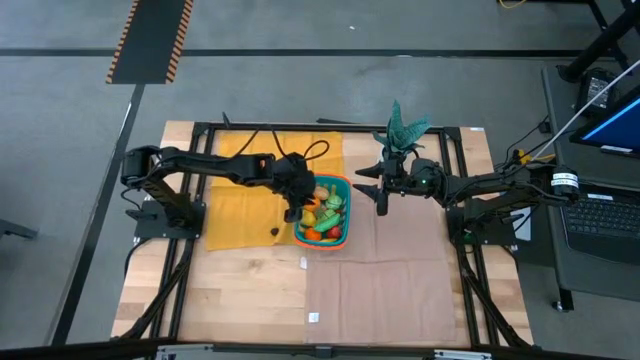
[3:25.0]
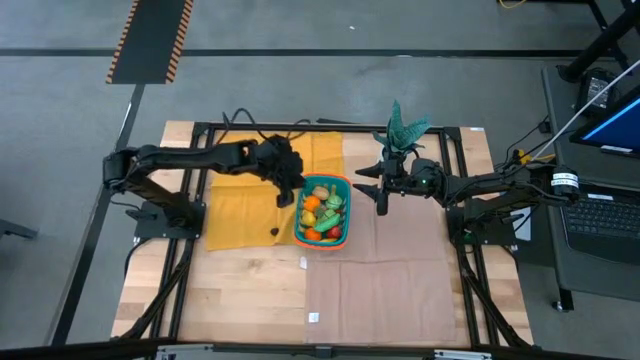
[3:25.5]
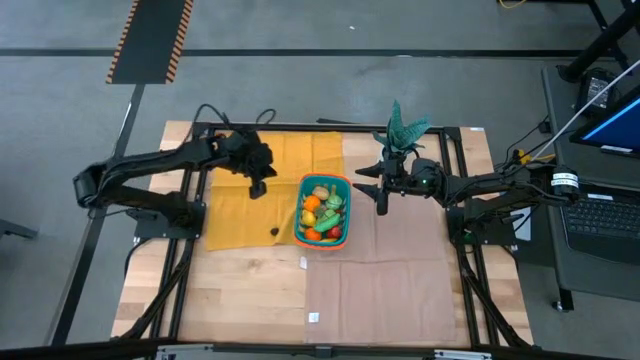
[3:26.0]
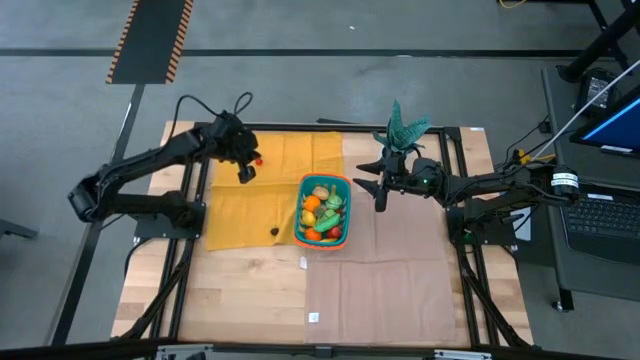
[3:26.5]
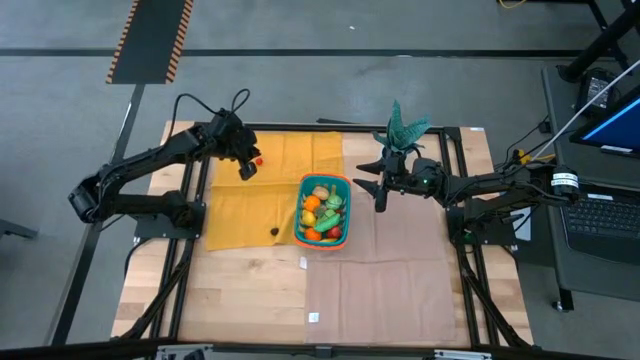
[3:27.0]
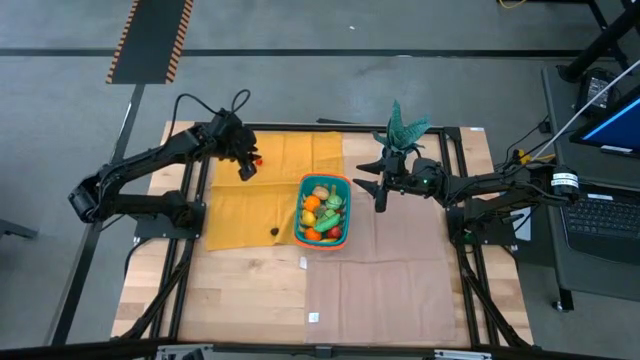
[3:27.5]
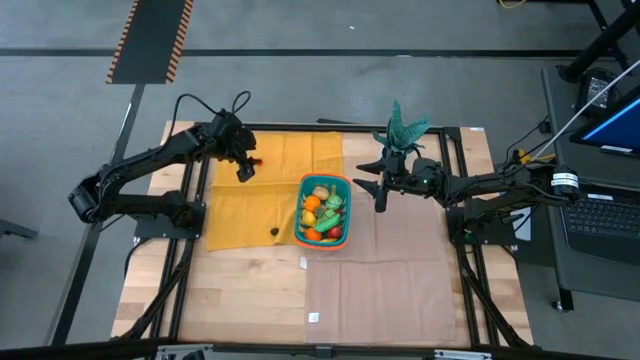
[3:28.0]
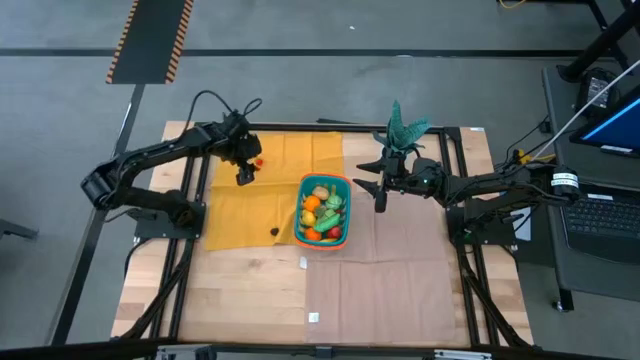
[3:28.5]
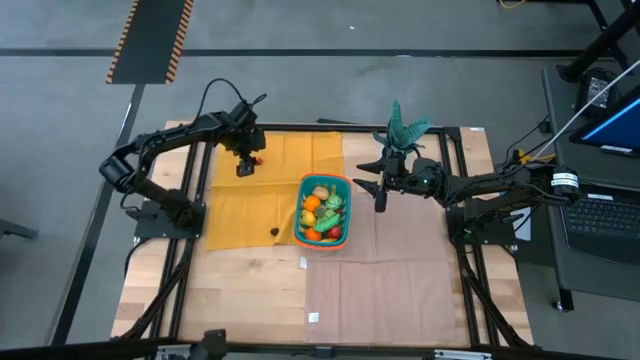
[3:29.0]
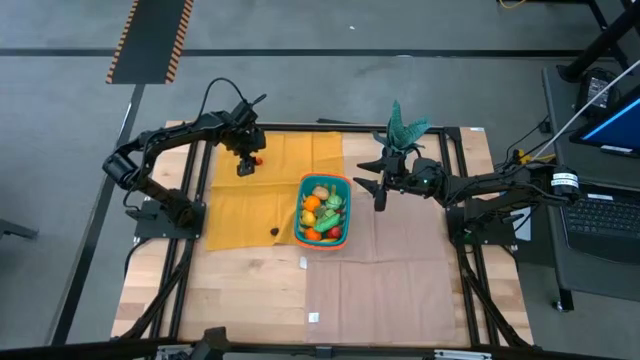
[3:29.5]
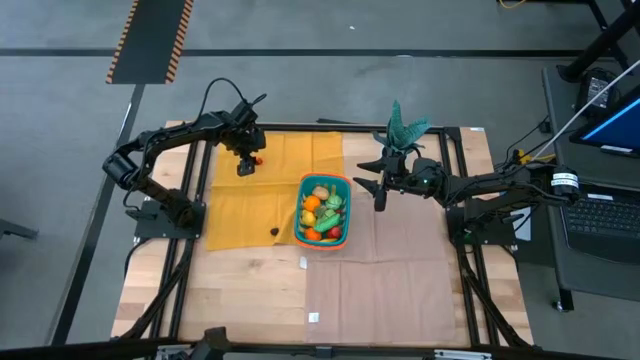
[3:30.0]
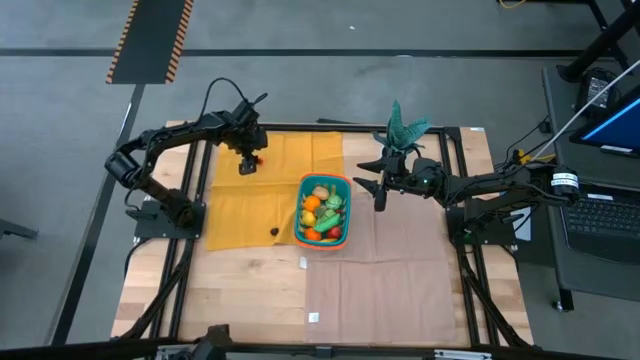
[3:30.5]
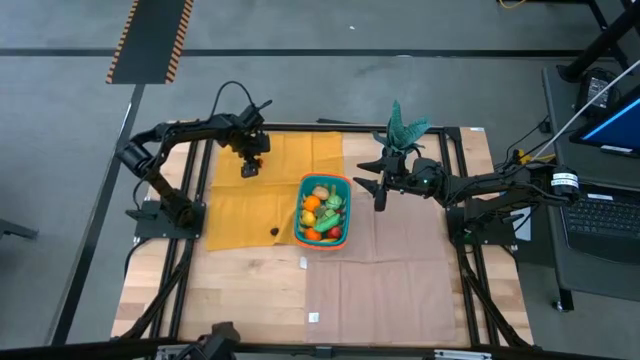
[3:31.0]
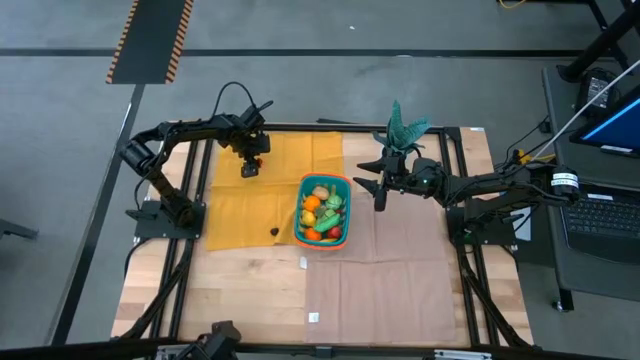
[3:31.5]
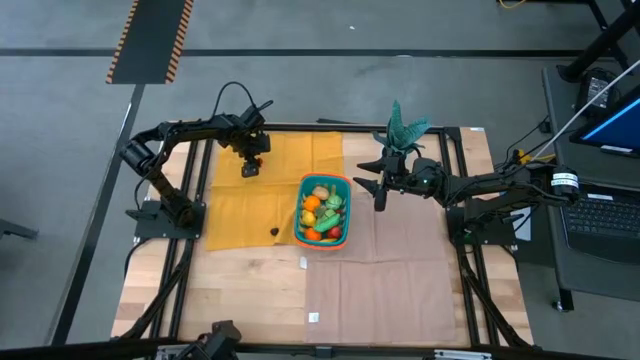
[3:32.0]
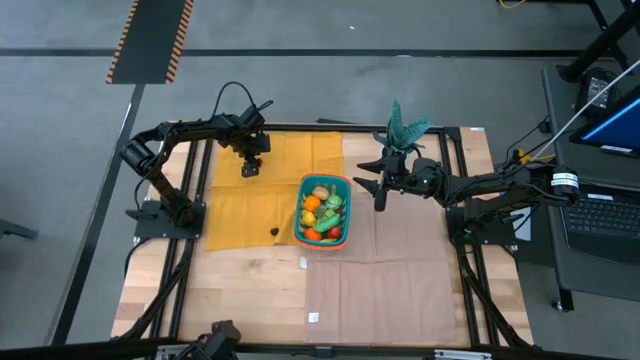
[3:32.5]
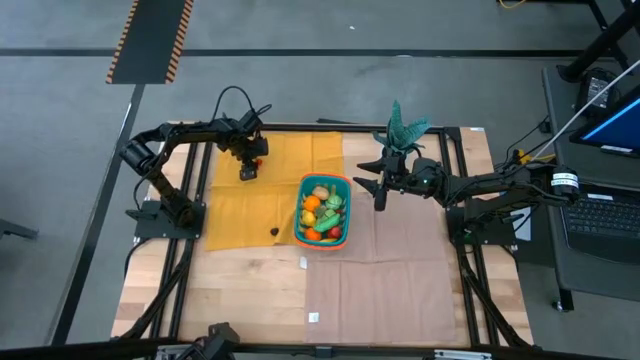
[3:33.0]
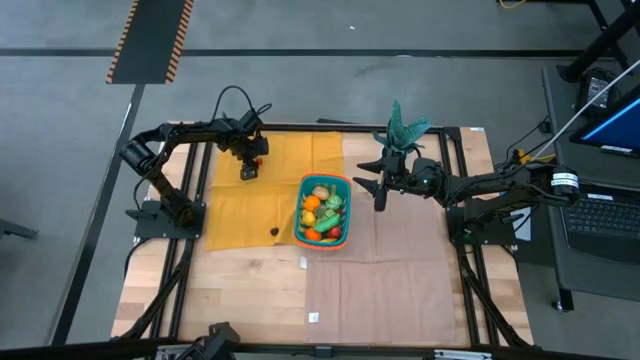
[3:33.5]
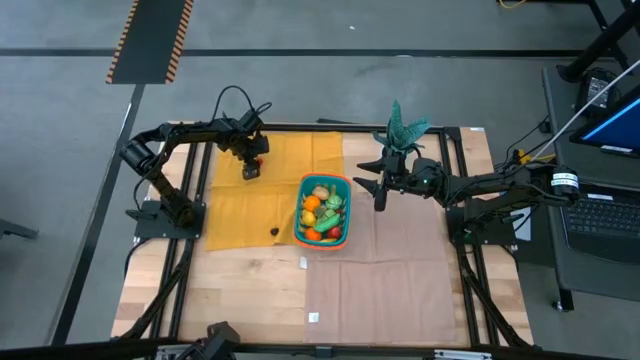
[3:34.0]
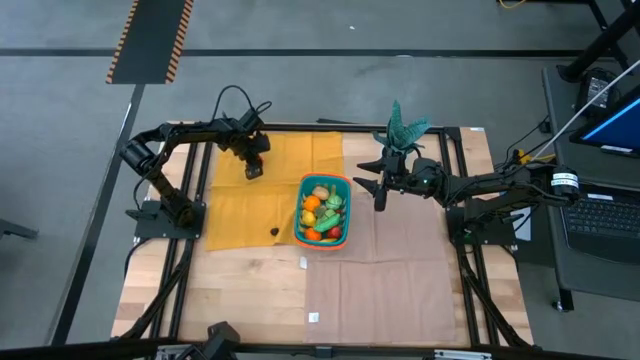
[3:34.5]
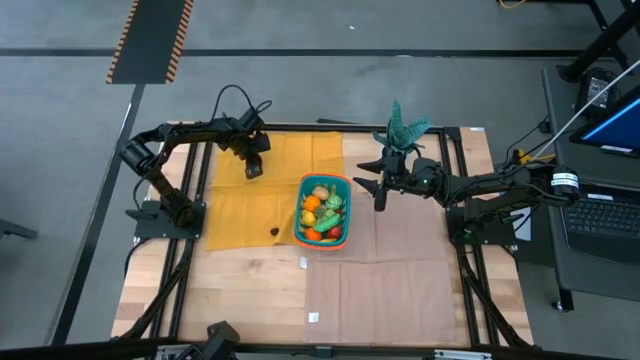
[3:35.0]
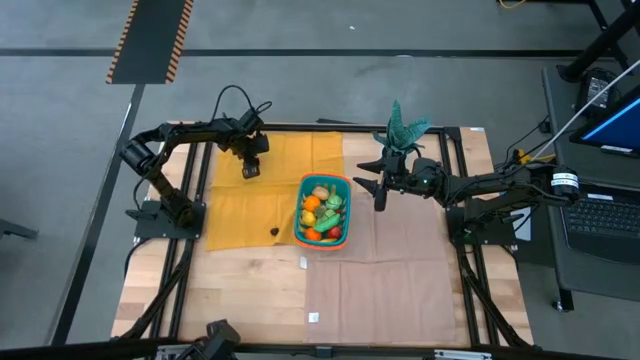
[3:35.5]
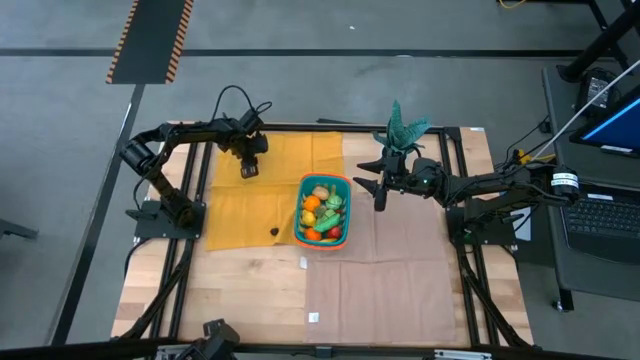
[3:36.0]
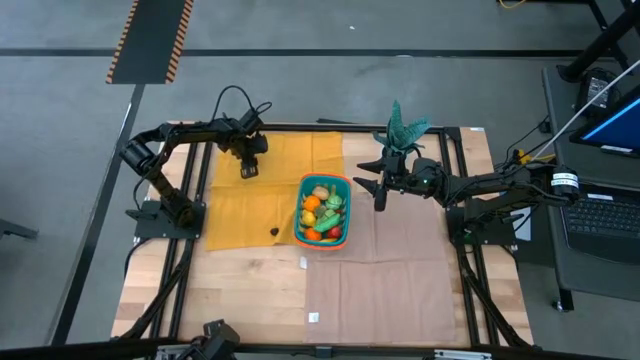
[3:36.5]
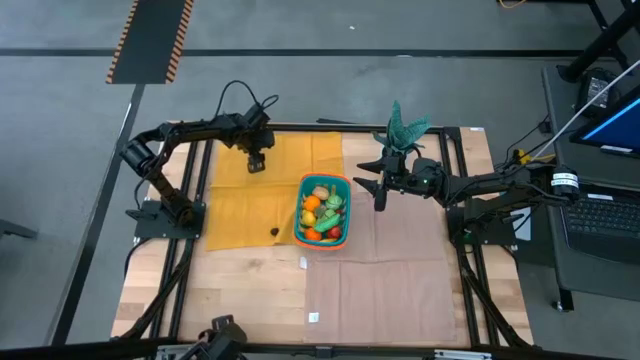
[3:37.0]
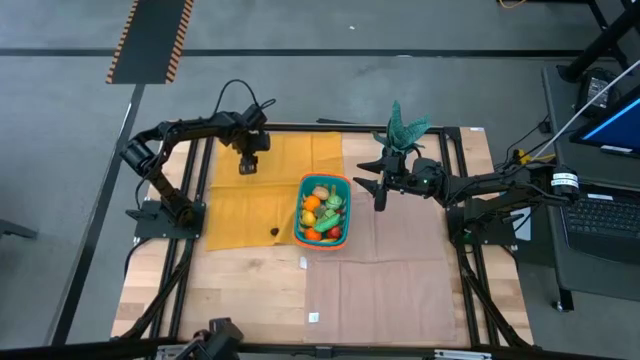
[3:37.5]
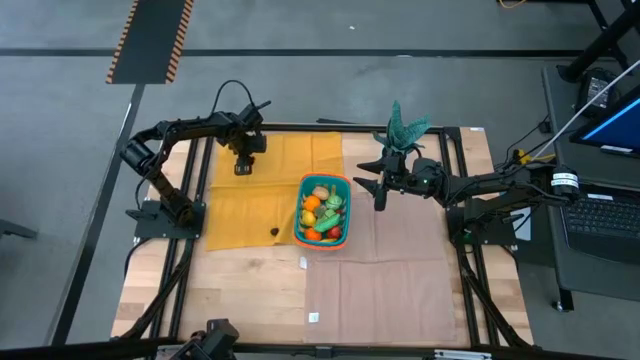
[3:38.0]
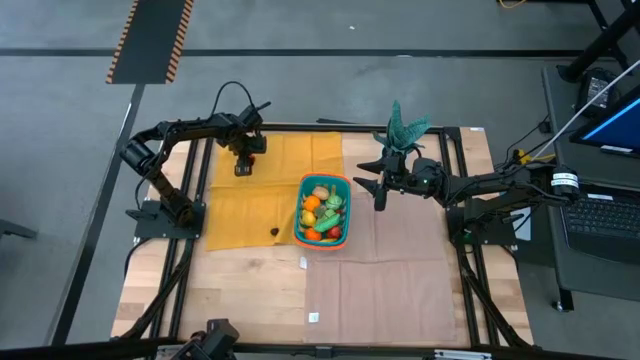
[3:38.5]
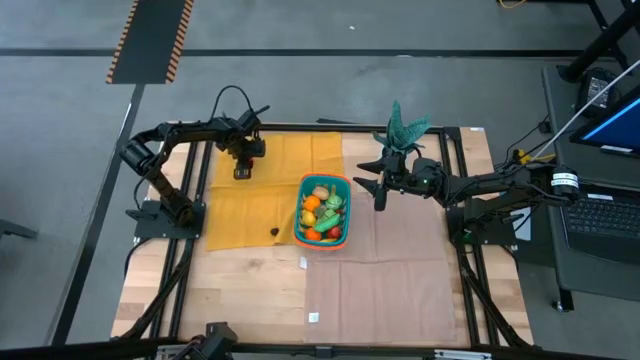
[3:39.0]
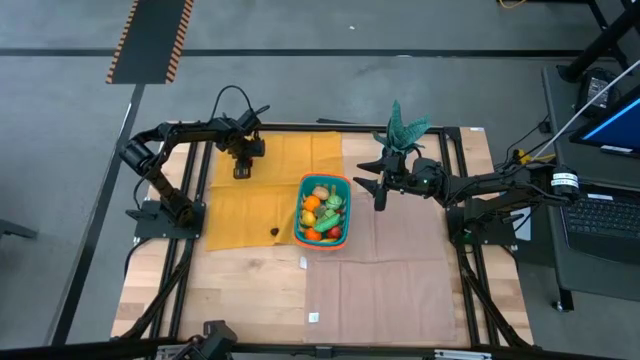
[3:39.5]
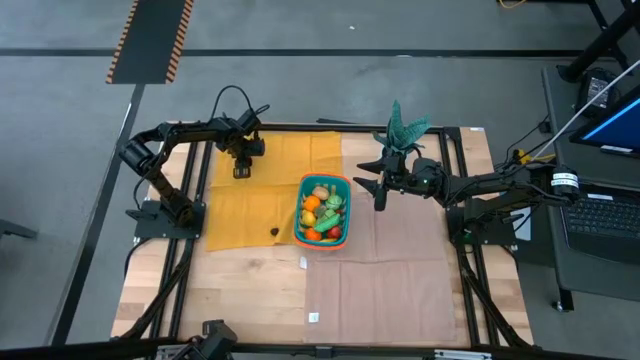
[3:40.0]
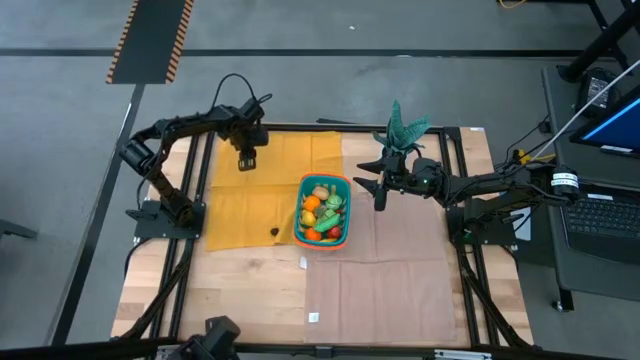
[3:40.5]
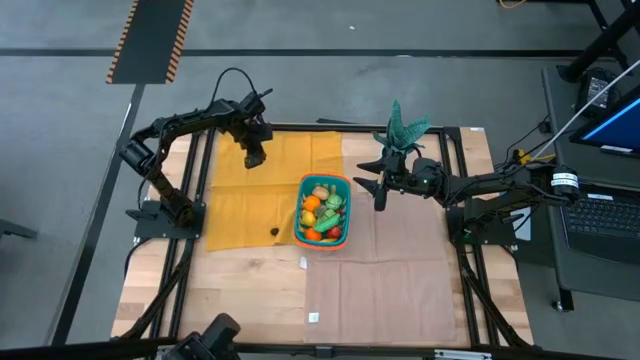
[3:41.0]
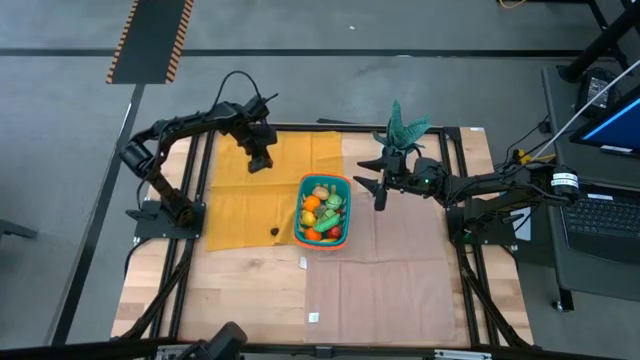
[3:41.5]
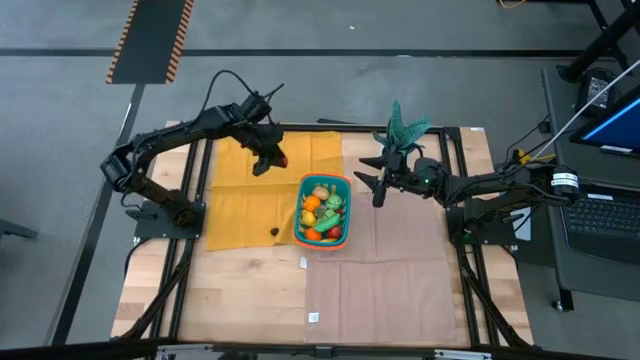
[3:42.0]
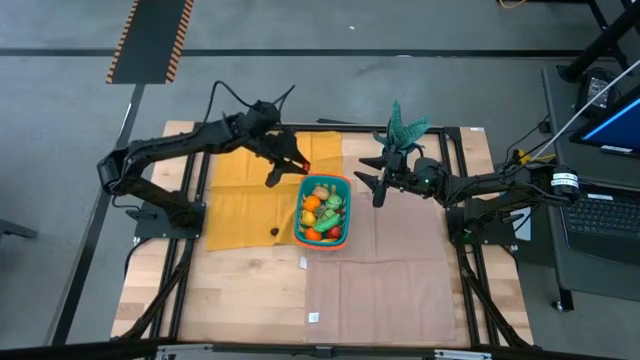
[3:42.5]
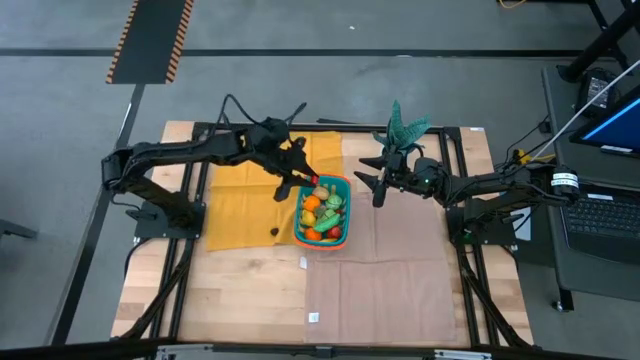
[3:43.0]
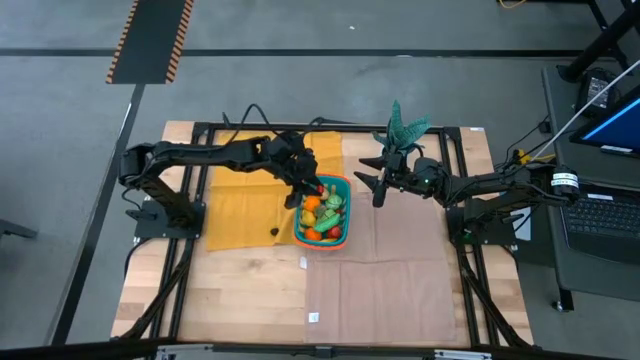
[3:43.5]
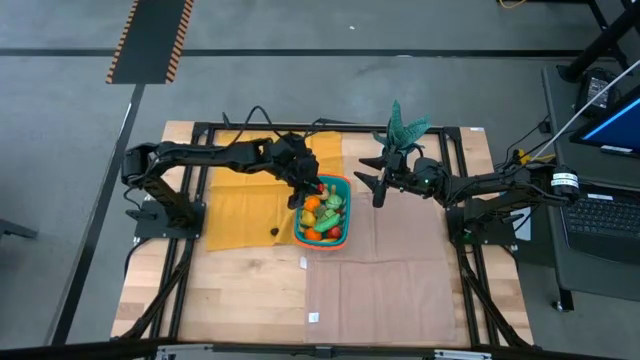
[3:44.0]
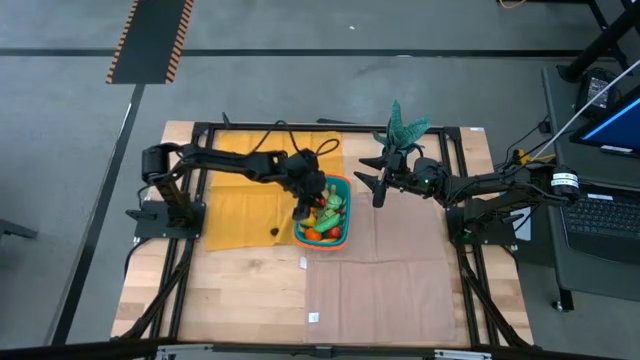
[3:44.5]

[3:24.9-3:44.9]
Task: Pick and placing Produce into tupperware
Put the cherry into the basket

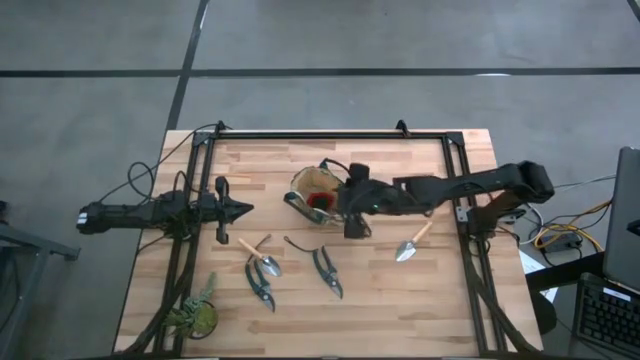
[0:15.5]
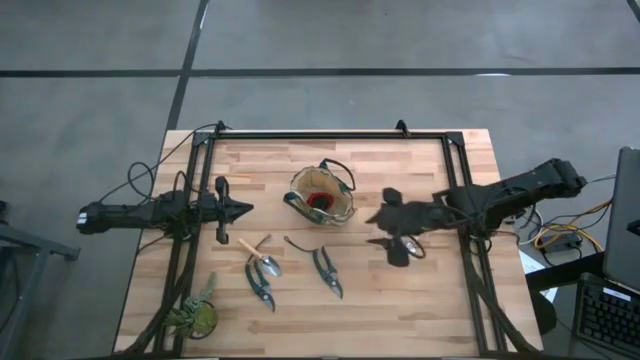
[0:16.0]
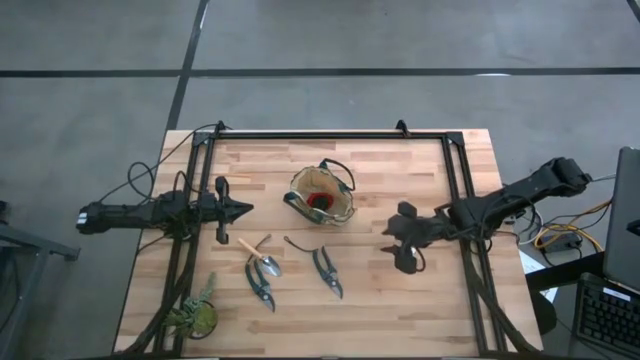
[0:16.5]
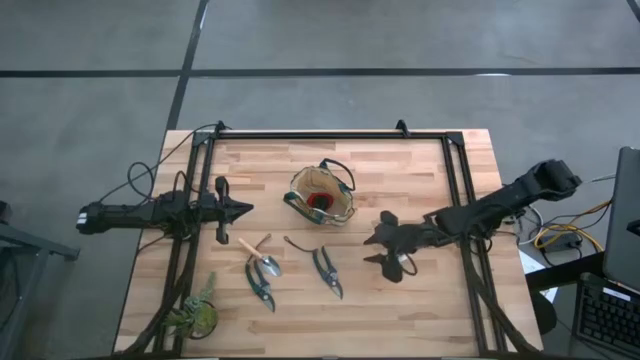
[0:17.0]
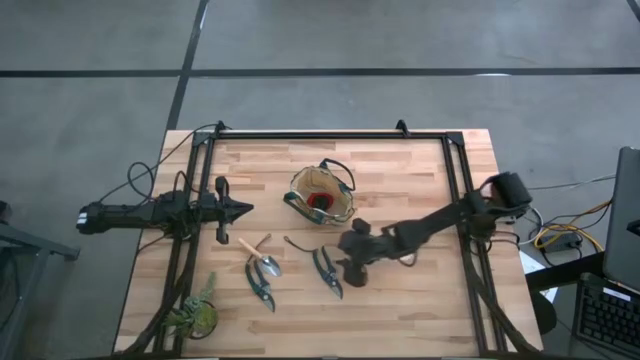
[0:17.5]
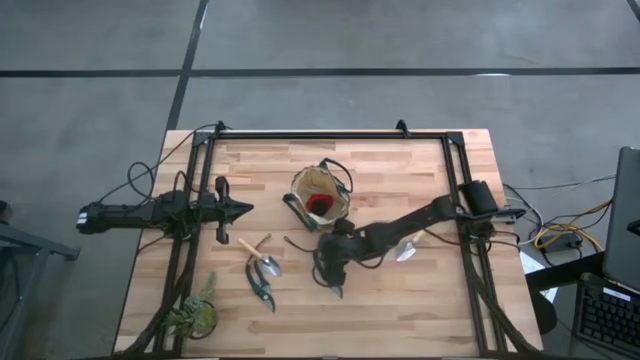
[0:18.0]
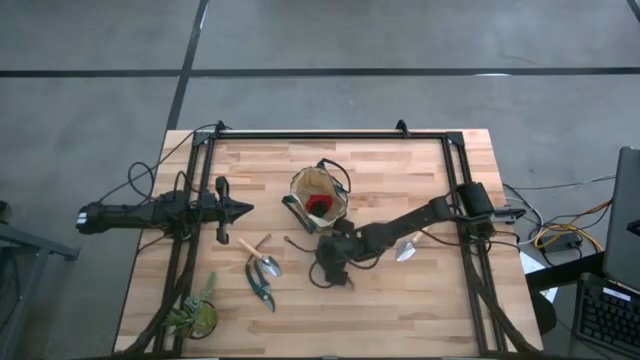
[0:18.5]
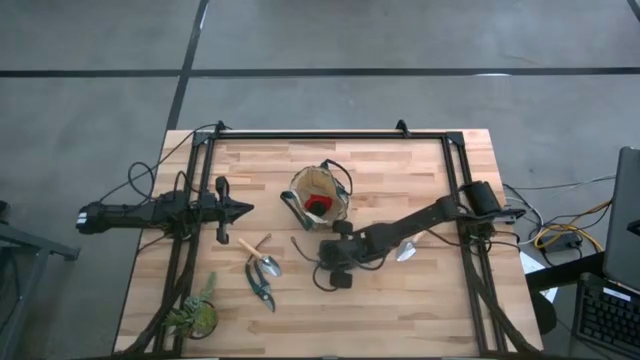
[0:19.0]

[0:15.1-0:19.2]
Task: Pick & Place Garden tools in Gardening bag
Put the right green shear scissors into the gardening bag
